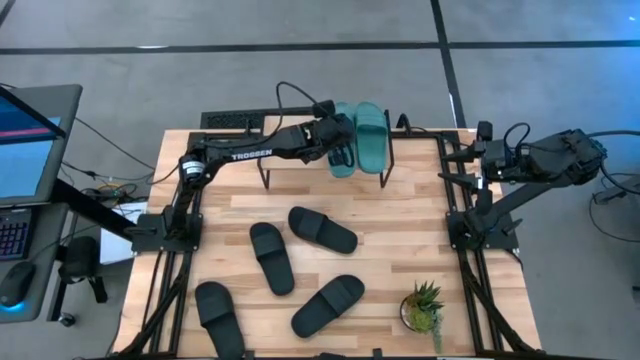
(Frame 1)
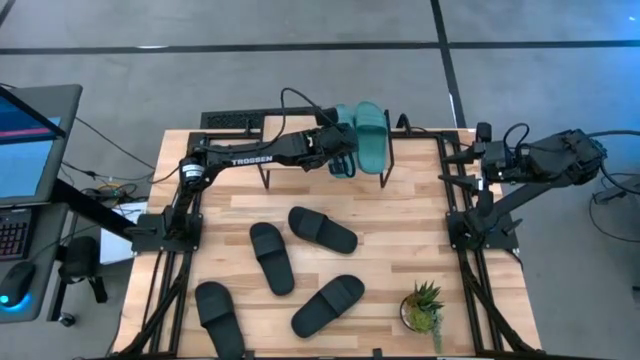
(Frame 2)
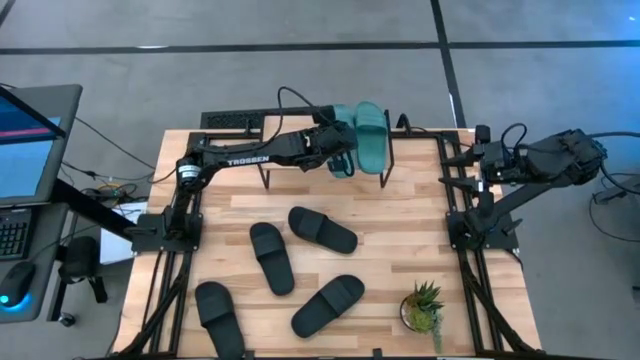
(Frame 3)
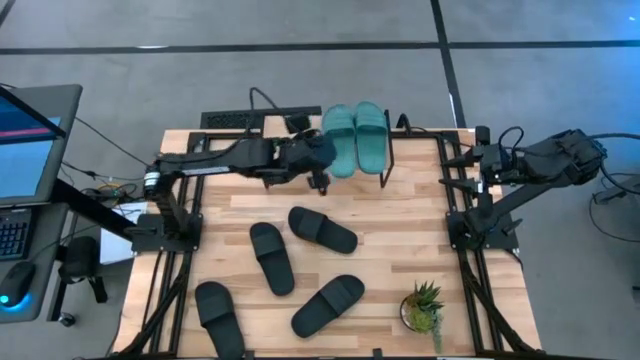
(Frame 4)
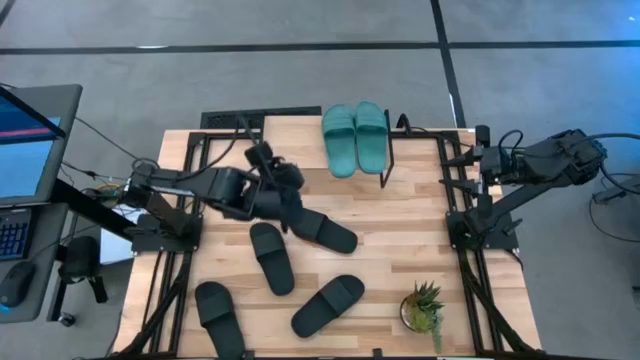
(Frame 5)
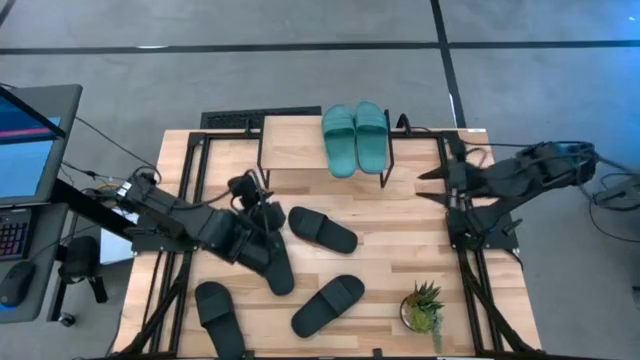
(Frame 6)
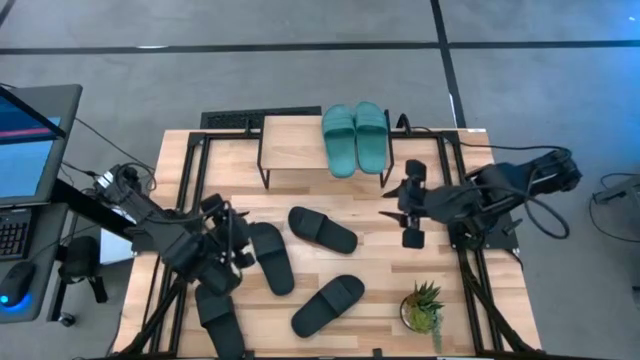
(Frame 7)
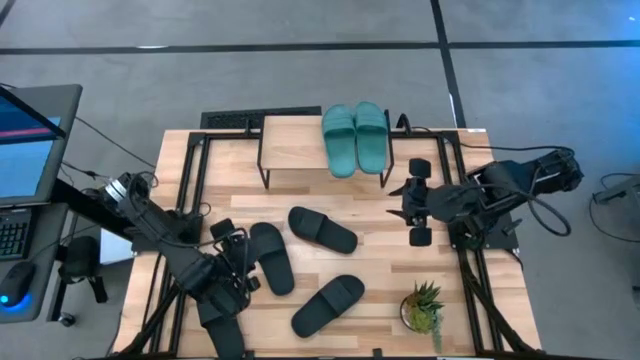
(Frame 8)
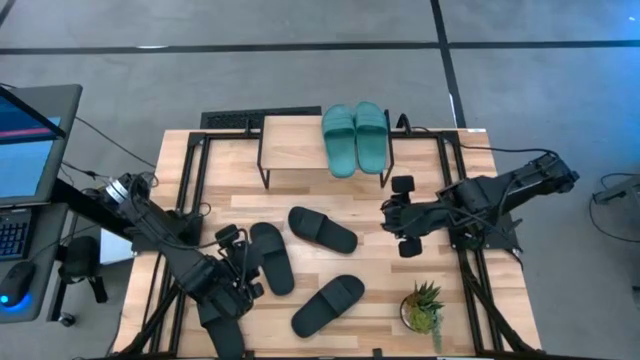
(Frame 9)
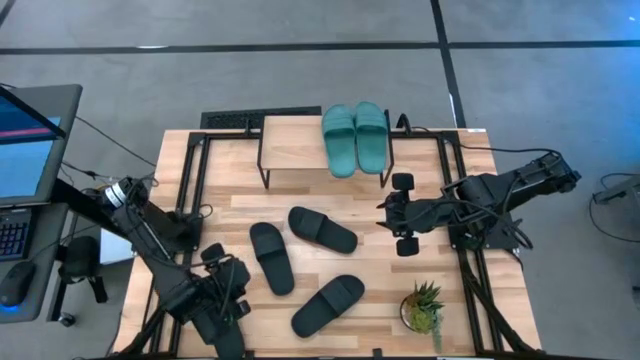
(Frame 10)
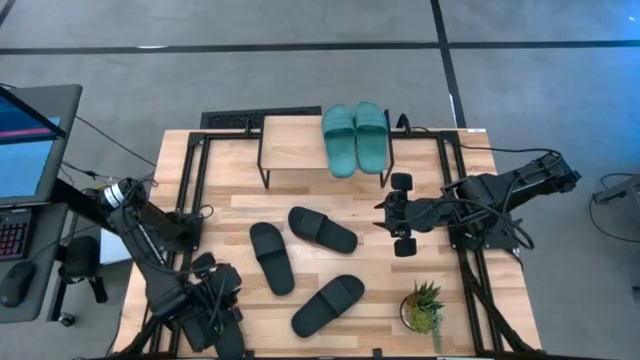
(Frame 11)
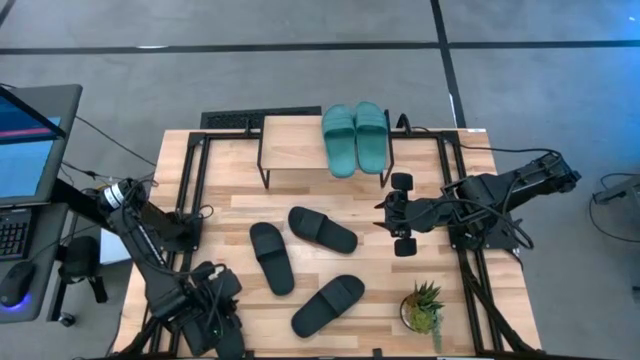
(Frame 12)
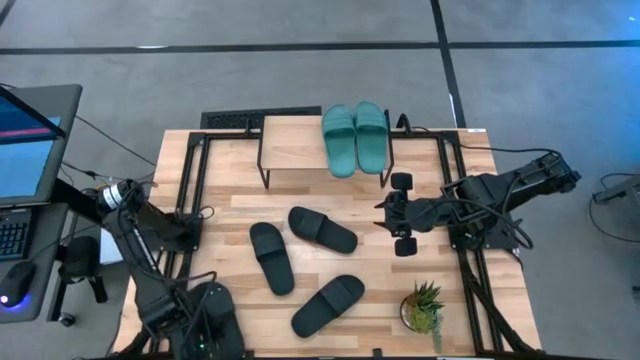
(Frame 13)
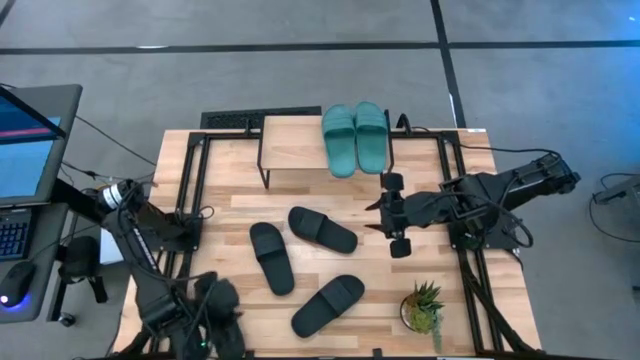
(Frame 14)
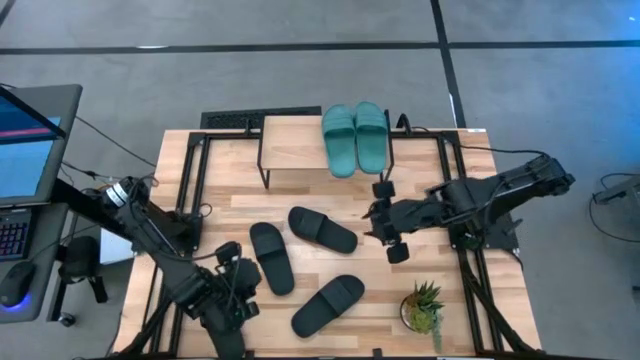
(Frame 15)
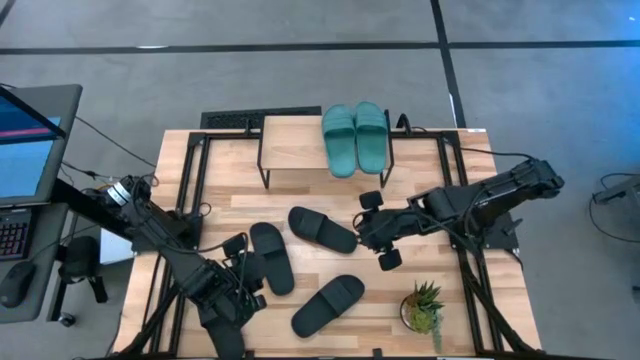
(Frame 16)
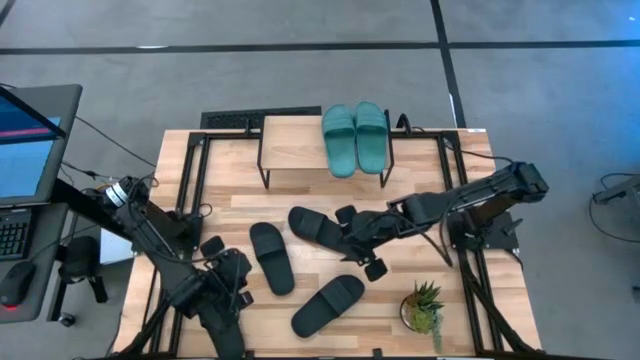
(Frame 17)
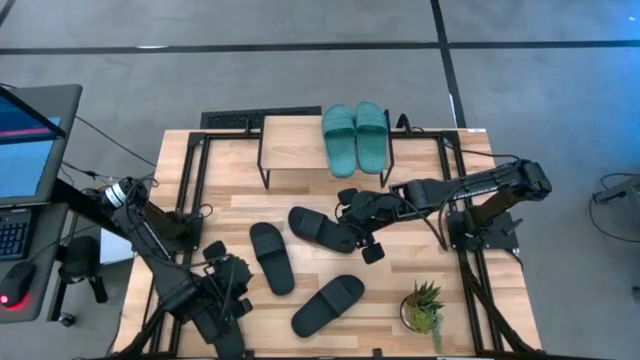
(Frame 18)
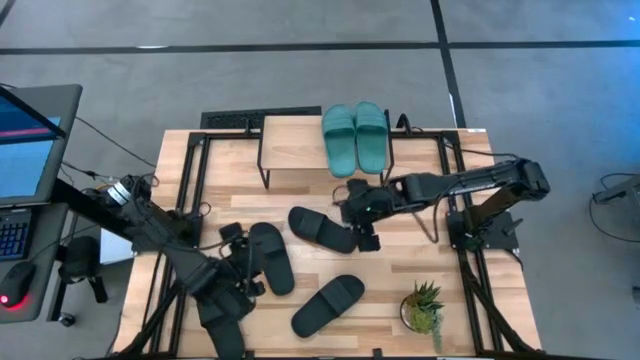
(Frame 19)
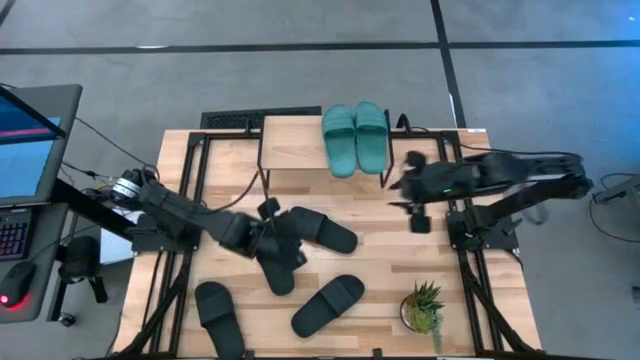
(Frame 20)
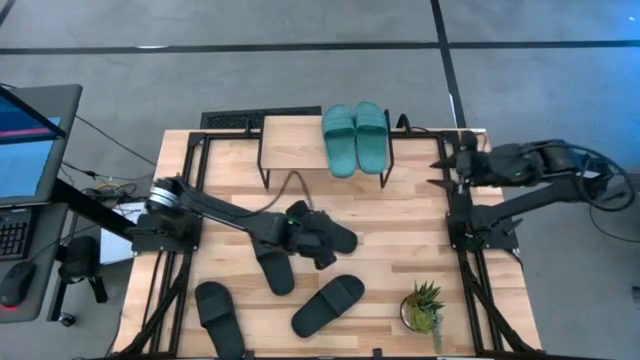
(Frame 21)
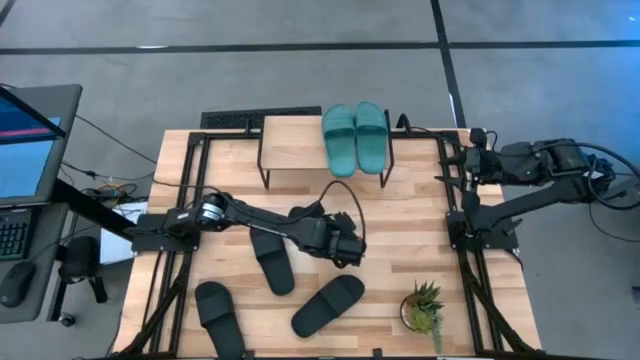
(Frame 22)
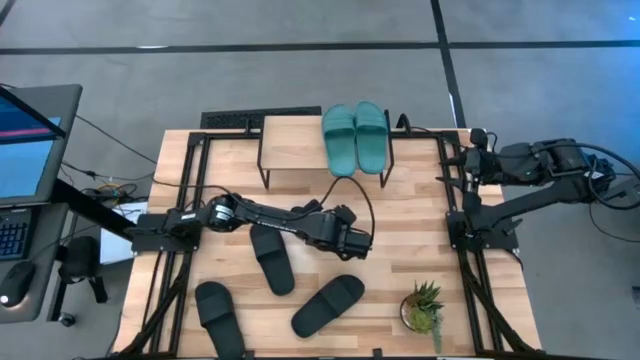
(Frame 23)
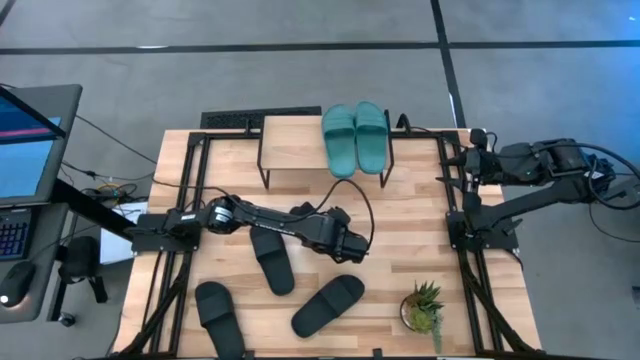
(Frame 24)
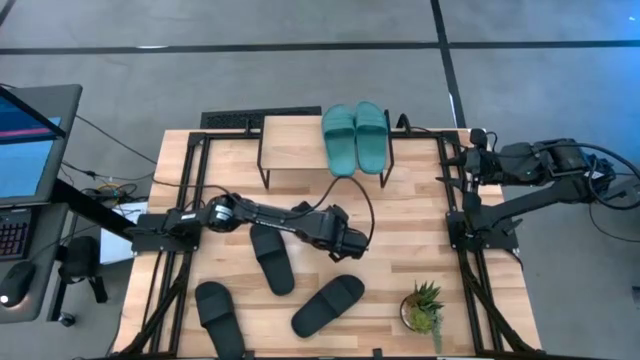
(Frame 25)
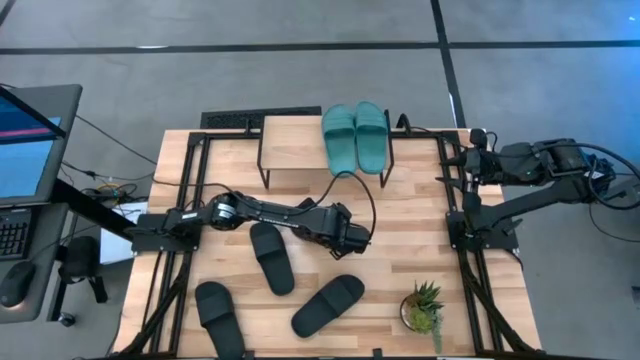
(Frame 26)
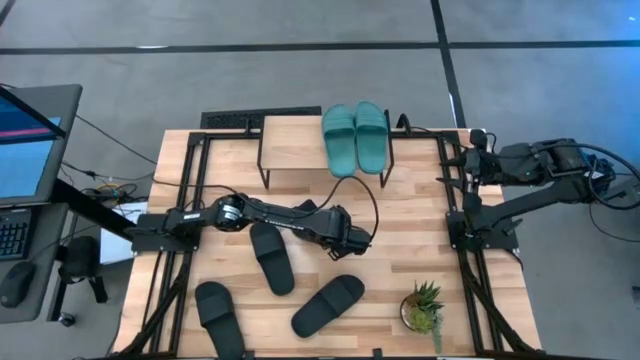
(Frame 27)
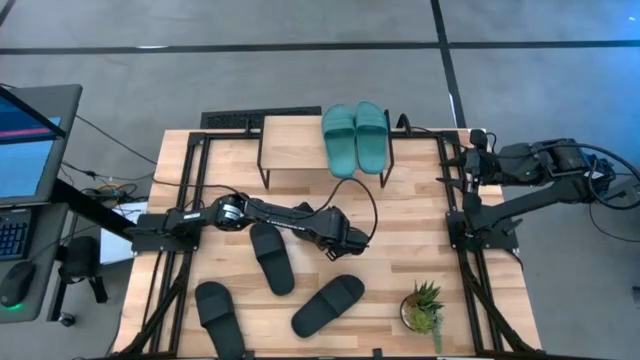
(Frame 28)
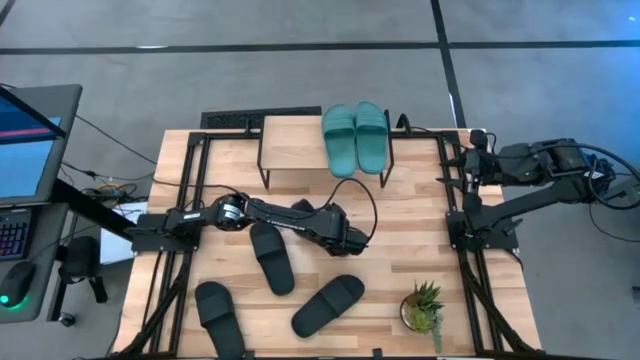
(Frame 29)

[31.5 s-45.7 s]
Task: Pick and place slides into the shelf
Put the black slipper on the shelf

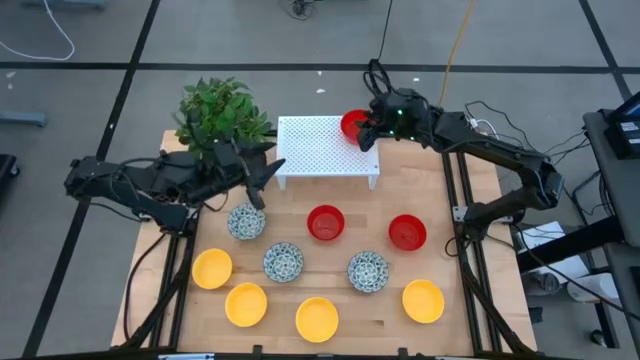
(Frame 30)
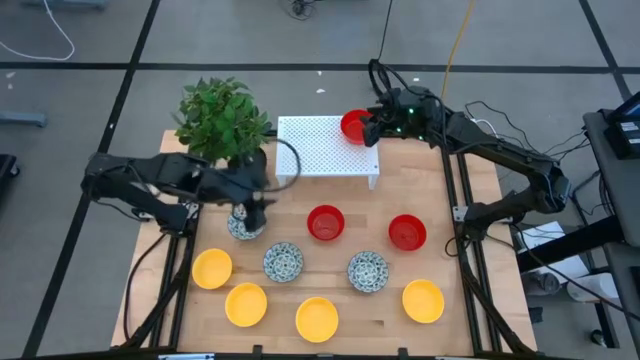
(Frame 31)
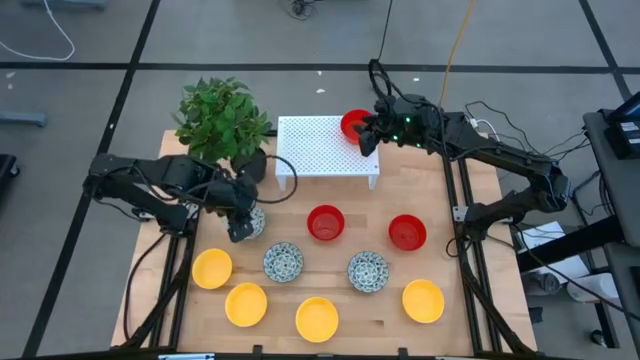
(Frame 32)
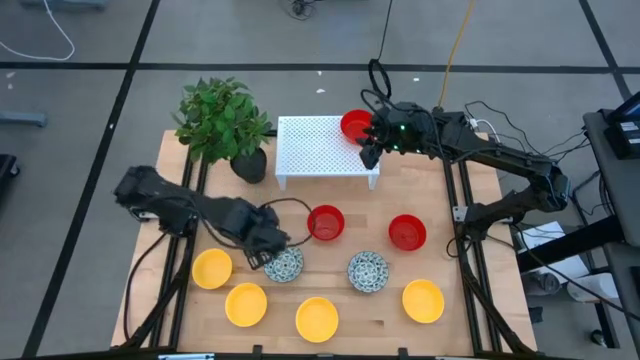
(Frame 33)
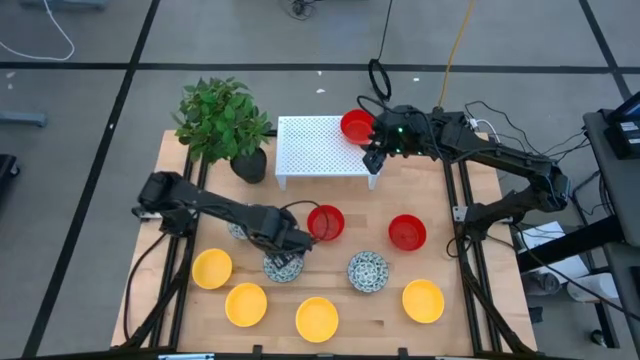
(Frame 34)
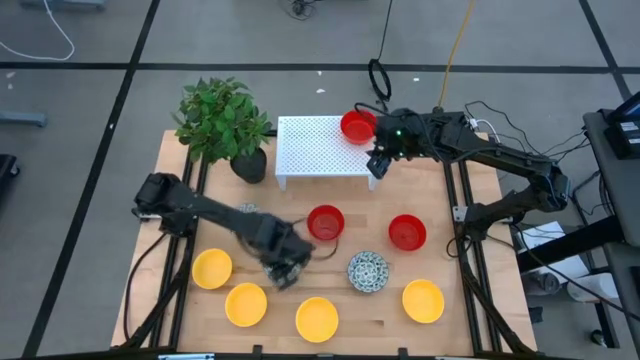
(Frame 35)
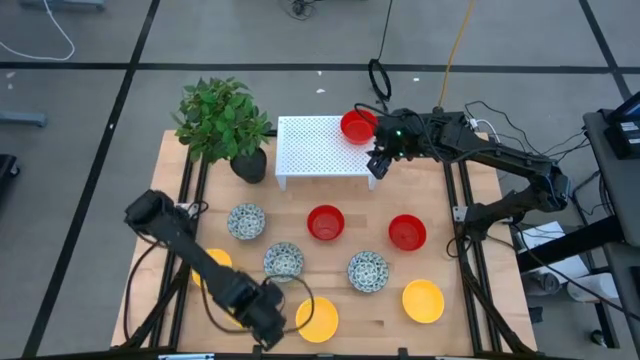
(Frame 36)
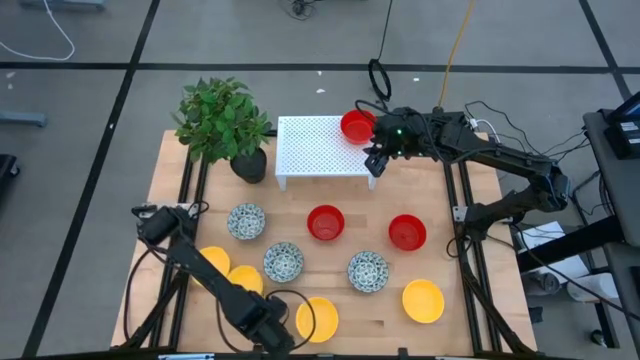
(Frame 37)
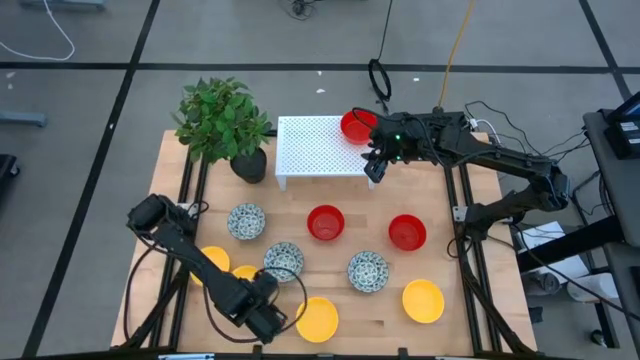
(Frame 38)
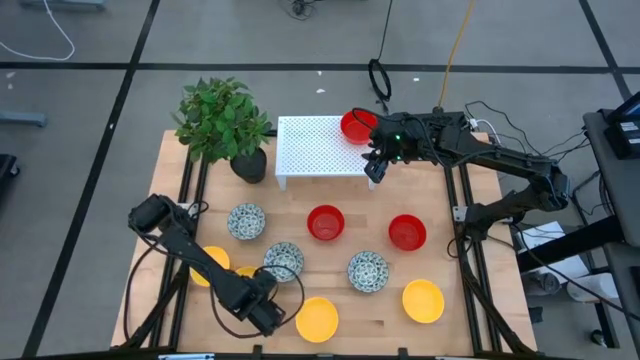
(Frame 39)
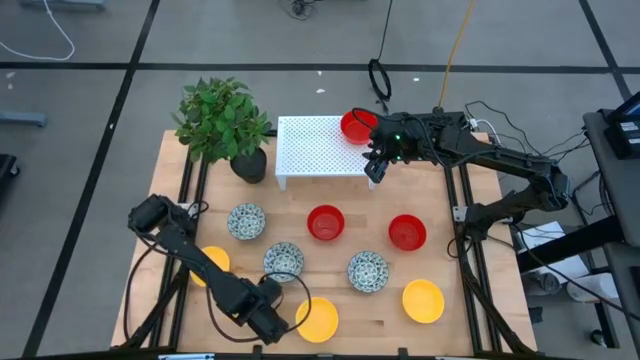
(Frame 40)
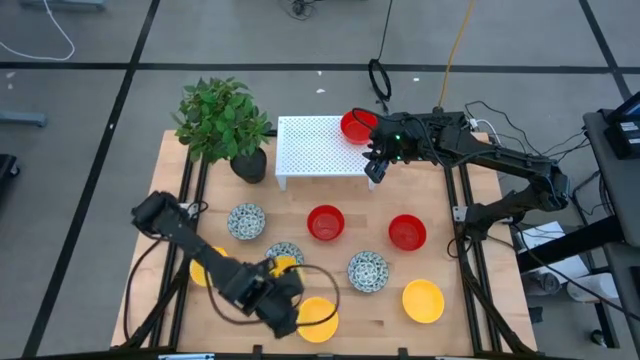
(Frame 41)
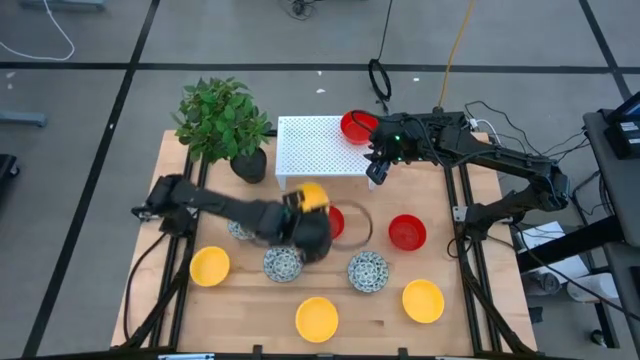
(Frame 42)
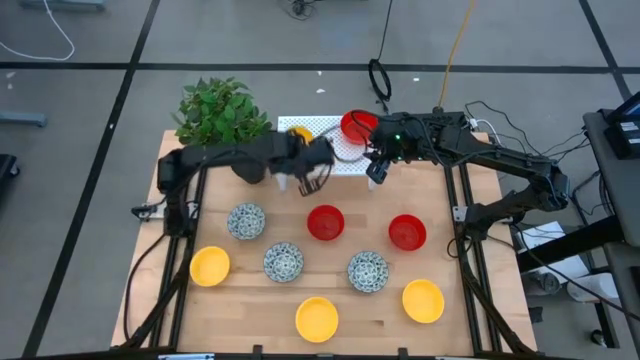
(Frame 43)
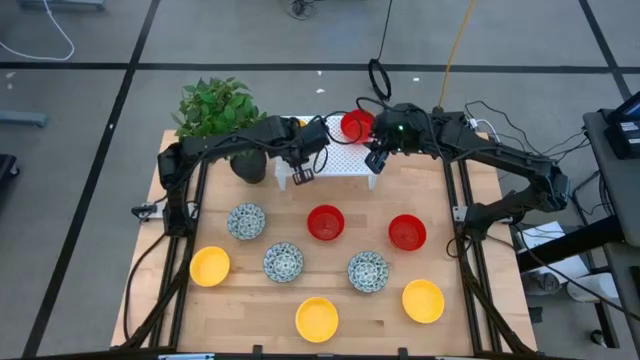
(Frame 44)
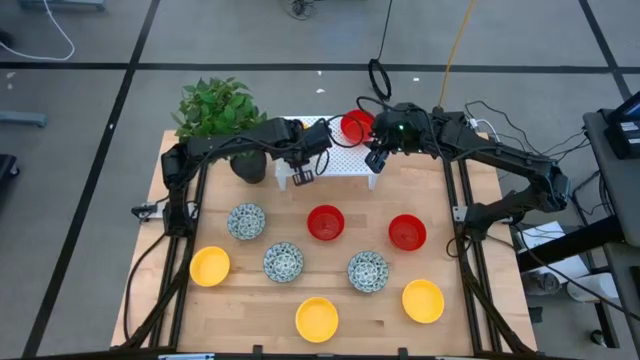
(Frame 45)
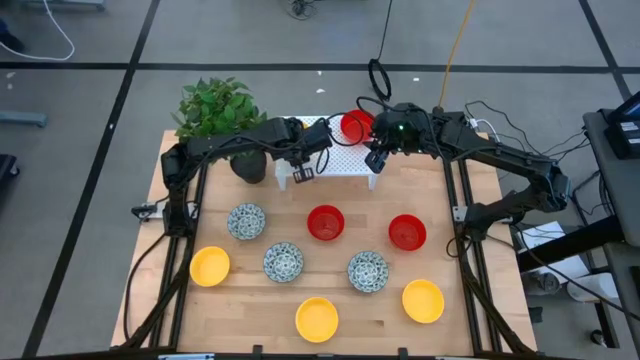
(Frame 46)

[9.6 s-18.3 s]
Task: Pick & Place Mini bowls
Put the yellow bowl on the shelf
